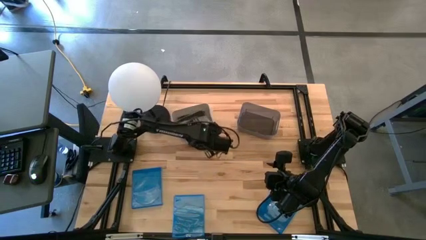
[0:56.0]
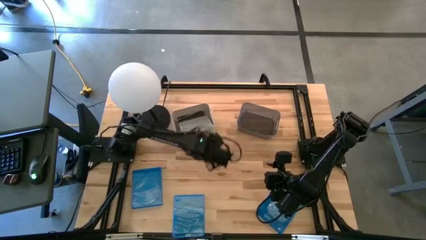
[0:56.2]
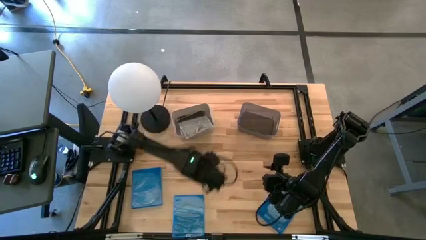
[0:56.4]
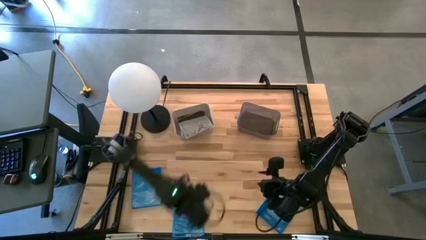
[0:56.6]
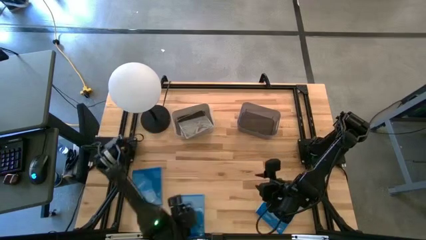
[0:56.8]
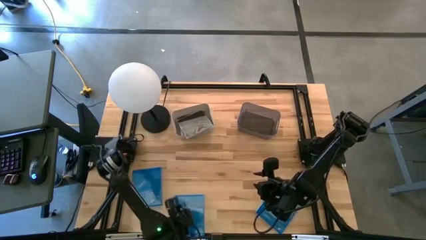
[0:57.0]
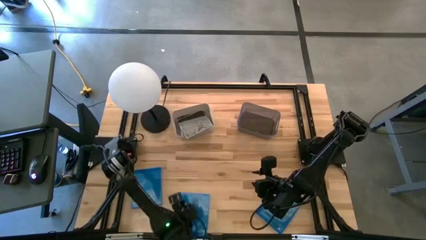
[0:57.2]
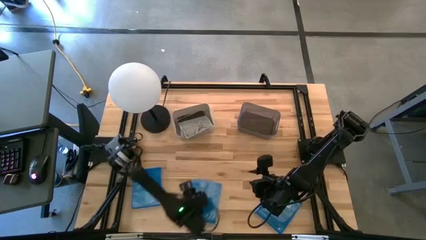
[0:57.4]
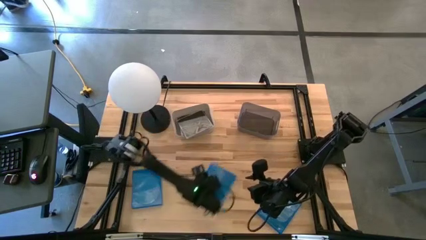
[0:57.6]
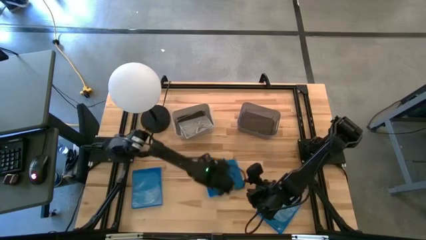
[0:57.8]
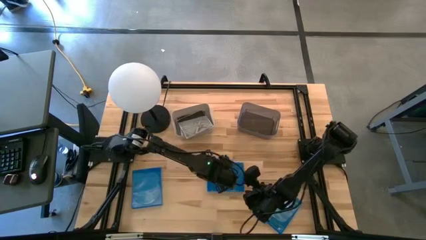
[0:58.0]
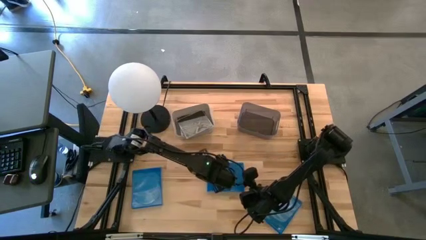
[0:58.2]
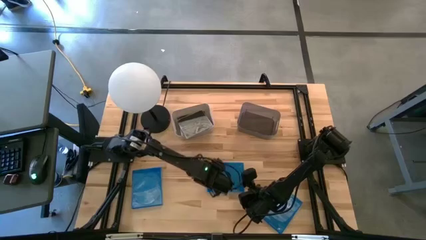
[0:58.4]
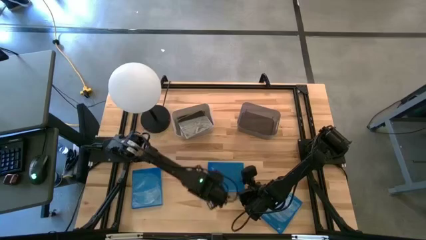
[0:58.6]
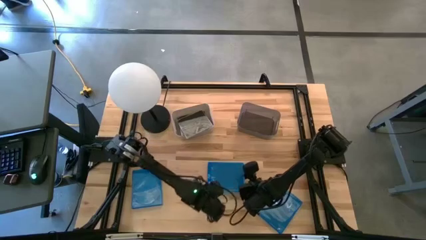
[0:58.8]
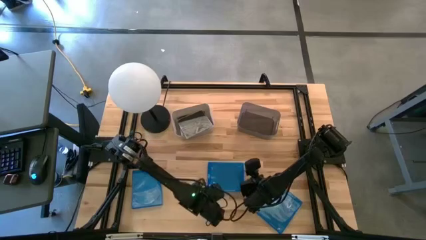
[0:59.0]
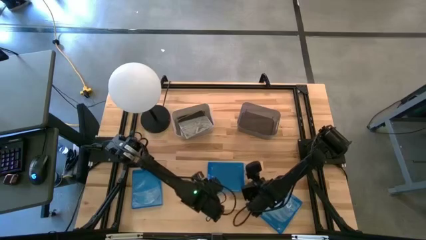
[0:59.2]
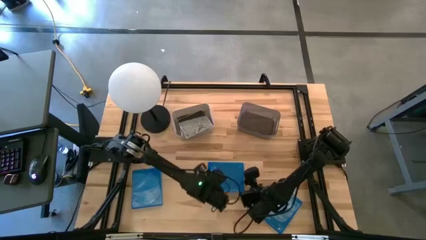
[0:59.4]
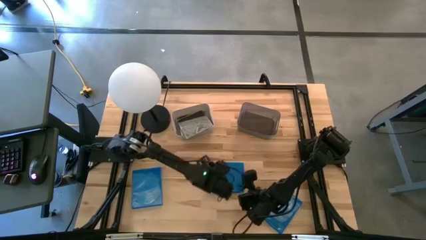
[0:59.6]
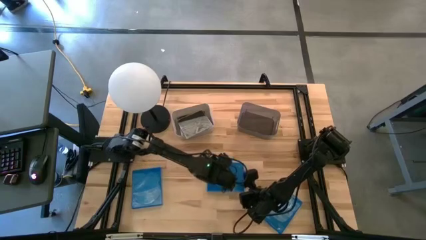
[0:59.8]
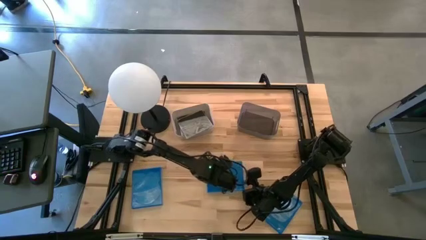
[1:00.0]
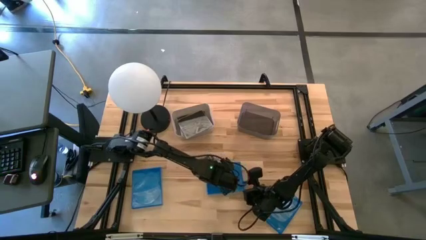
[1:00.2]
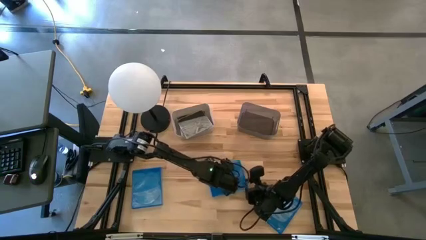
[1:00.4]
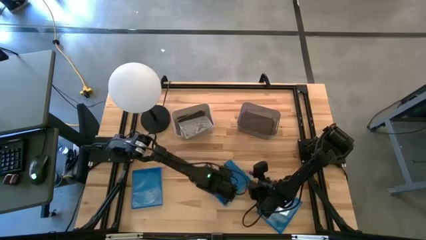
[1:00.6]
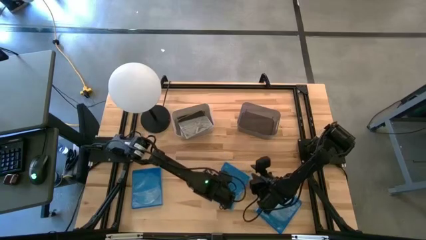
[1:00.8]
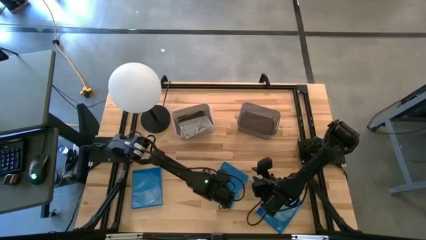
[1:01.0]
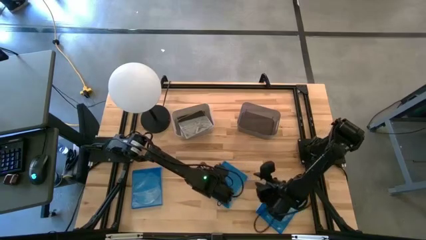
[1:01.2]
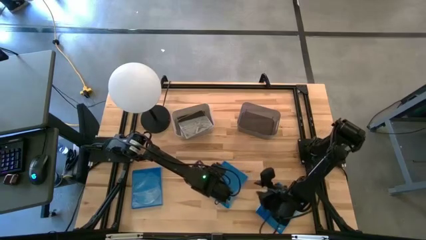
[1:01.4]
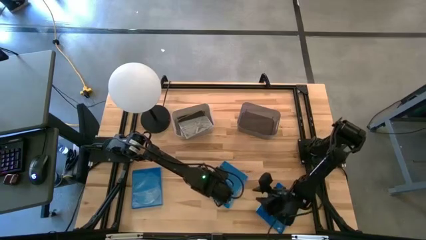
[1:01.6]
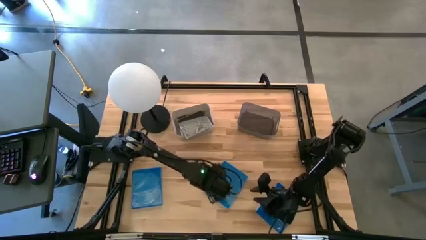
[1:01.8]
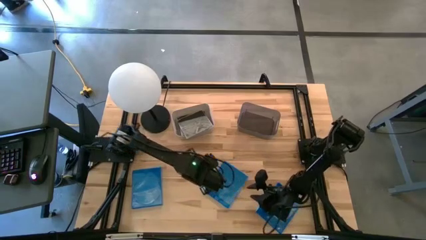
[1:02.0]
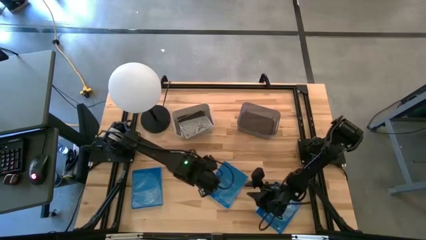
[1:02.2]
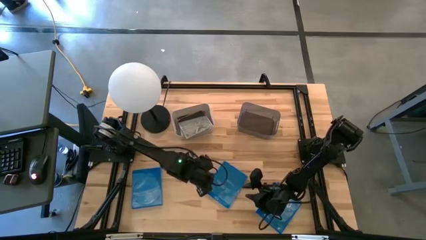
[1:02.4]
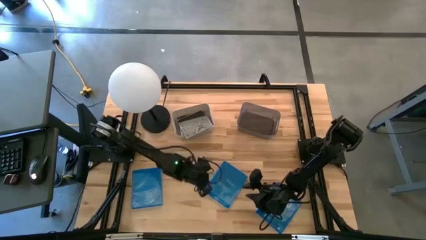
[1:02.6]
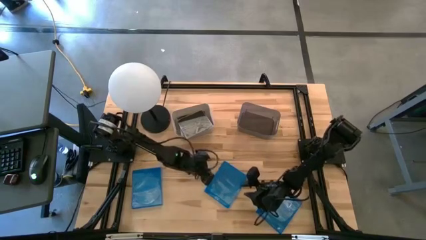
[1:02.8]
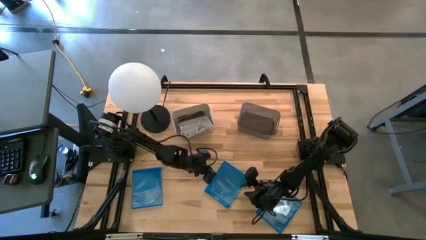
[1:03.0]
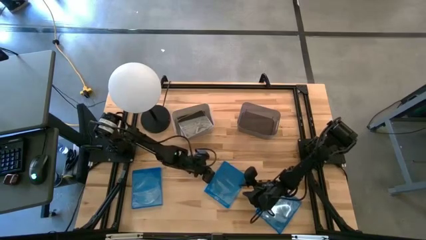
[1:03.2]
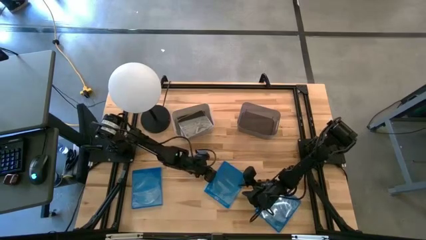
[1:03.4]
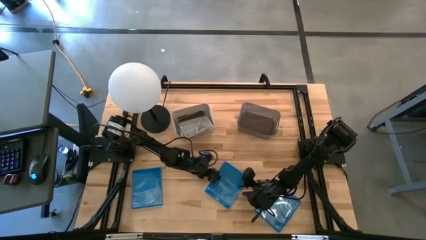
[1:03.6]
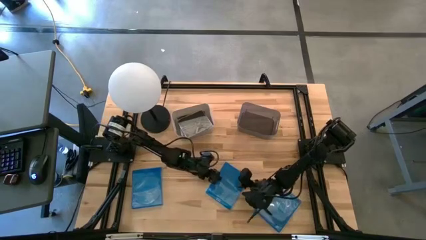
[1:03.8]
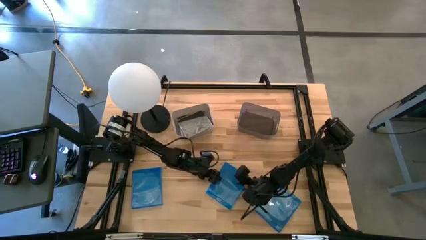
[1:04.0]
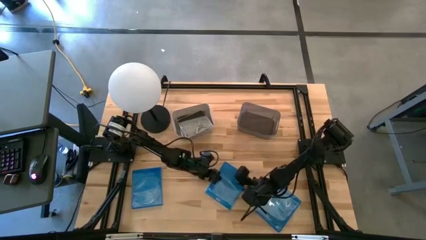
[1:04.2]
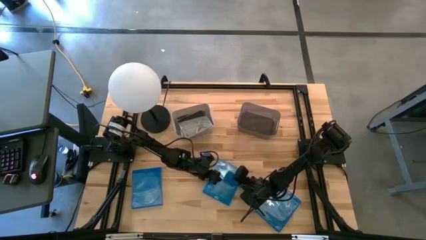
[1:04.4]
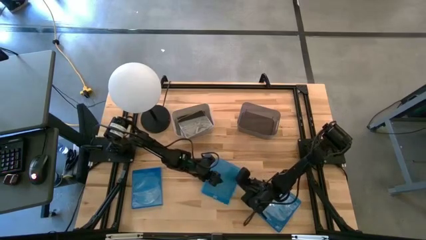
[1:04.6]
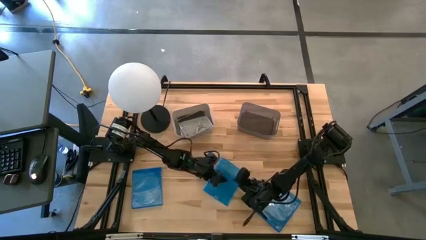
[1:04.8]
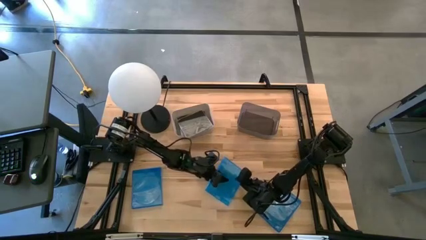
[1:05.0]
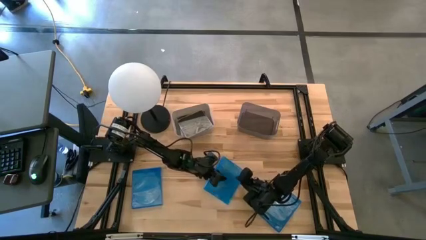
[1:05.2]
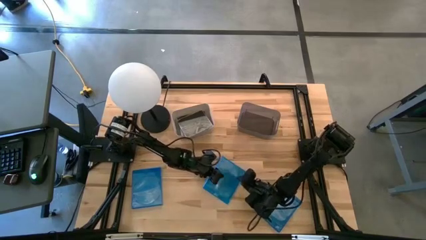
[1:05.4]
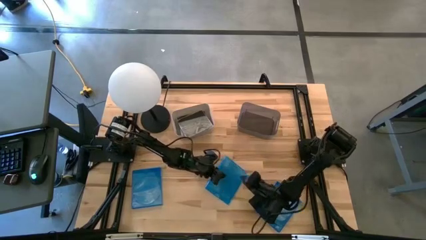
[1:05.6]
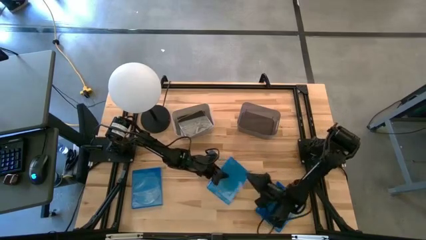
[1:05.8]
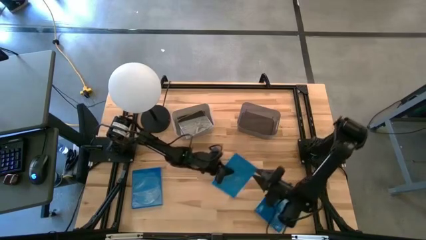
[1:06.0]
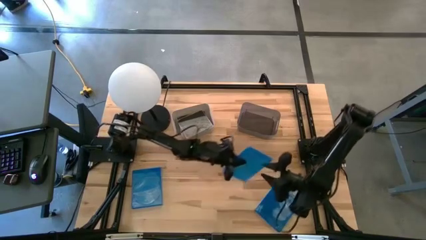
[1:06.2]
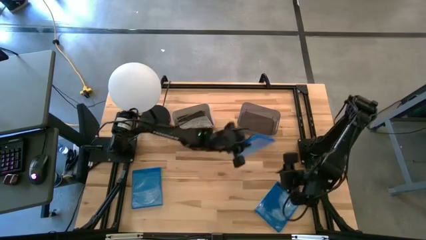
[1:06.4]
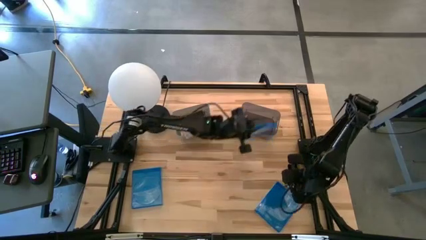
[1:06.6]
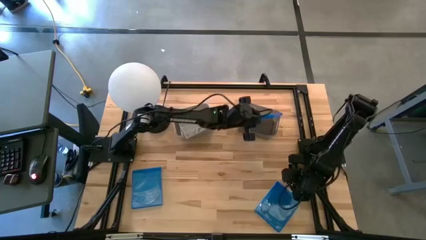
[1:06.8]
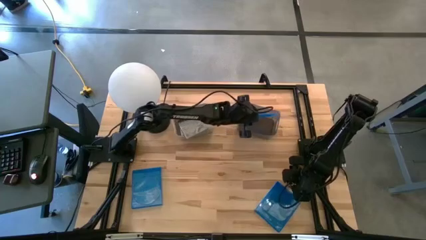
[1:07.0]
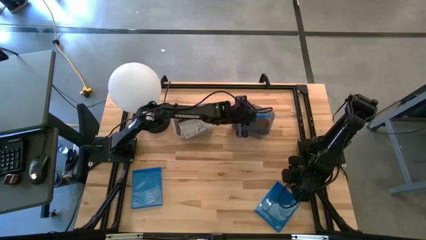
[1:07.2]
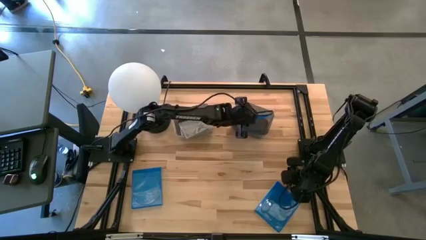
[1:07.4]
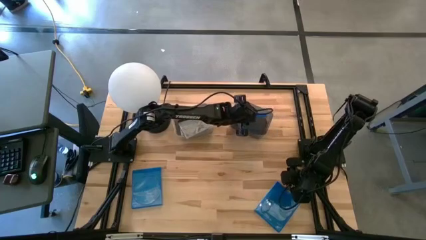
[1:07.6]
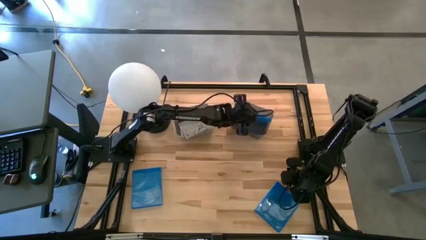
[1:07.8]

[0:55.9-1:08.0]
Task: Pick & place jewel cases by type
Put the middle left blue CD case into the black bin

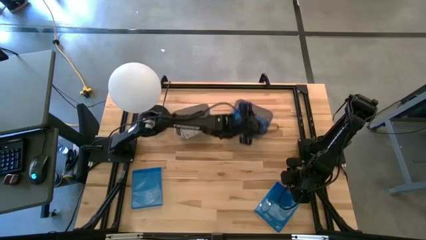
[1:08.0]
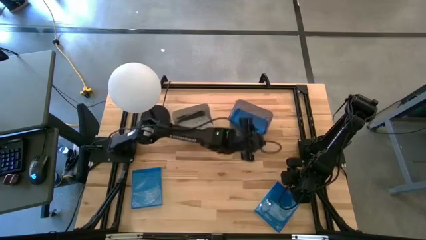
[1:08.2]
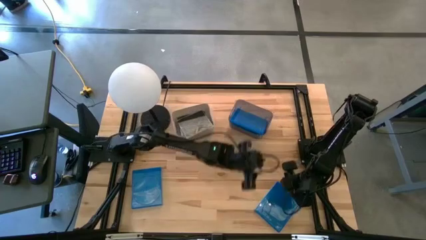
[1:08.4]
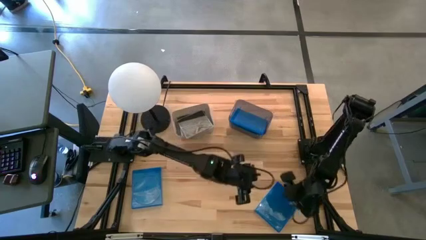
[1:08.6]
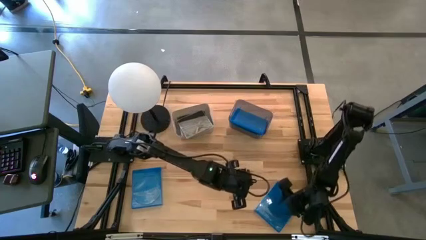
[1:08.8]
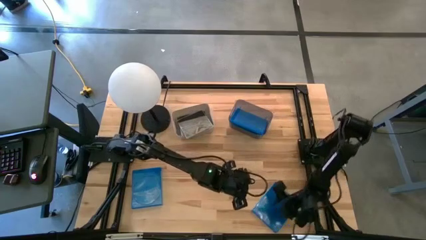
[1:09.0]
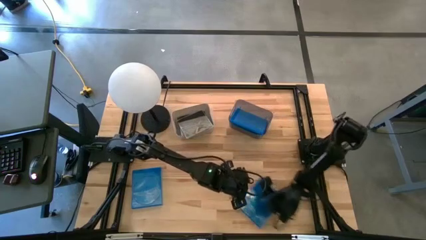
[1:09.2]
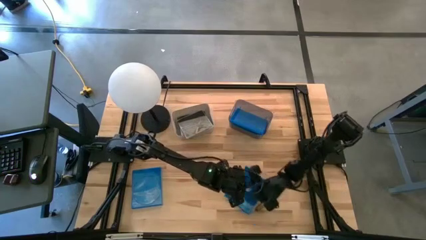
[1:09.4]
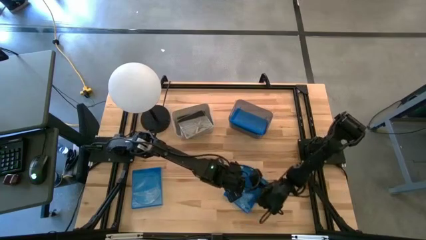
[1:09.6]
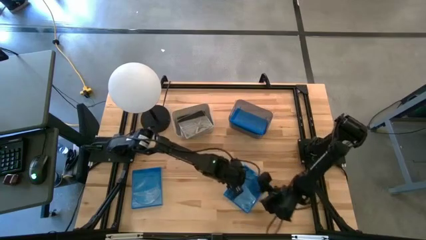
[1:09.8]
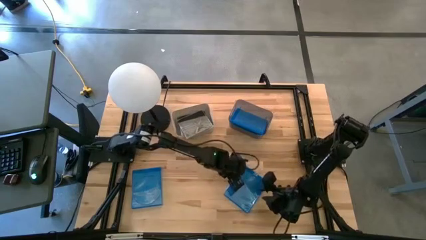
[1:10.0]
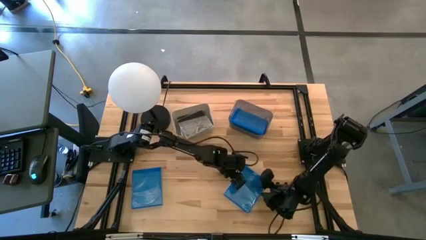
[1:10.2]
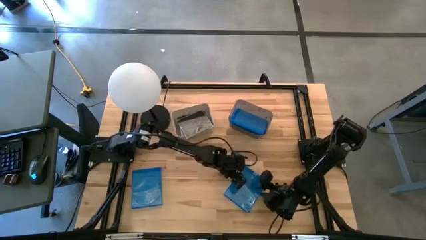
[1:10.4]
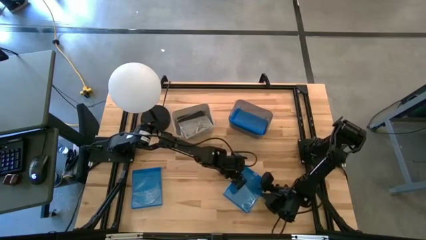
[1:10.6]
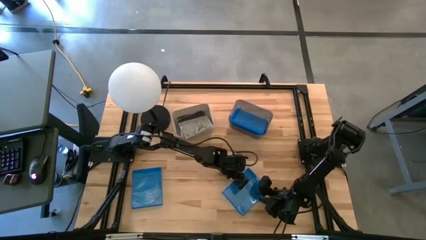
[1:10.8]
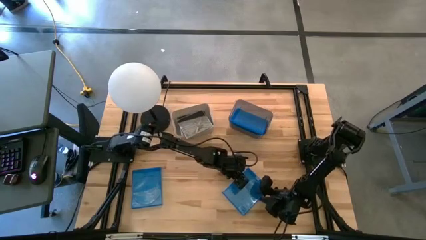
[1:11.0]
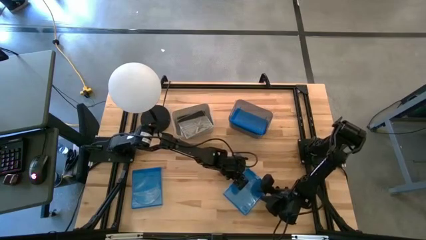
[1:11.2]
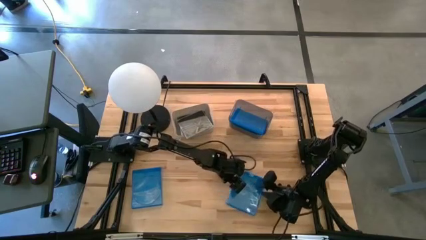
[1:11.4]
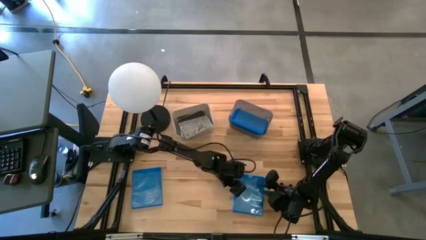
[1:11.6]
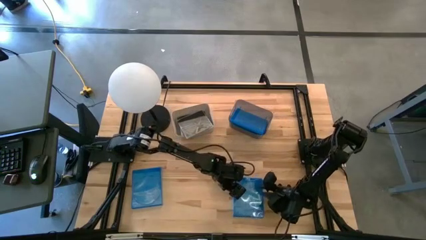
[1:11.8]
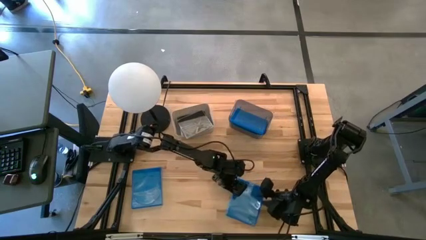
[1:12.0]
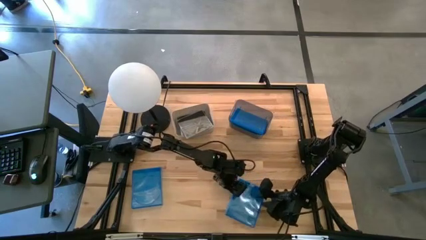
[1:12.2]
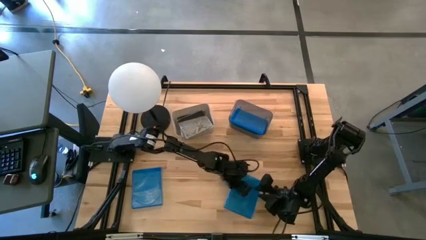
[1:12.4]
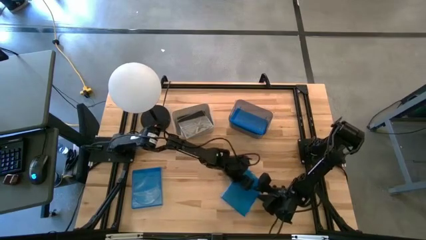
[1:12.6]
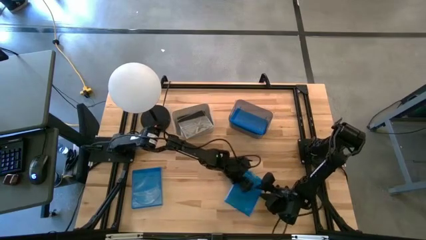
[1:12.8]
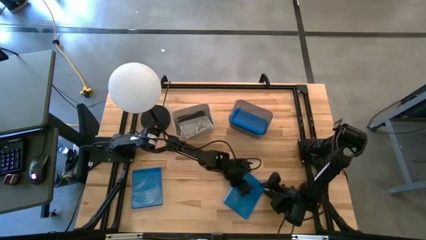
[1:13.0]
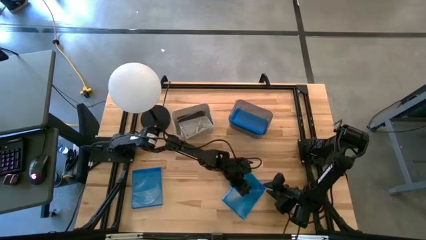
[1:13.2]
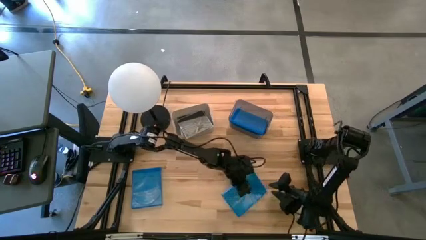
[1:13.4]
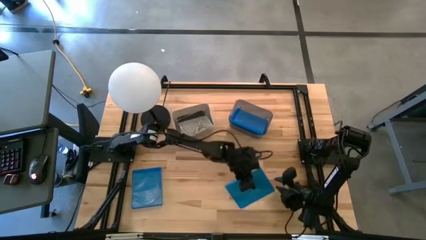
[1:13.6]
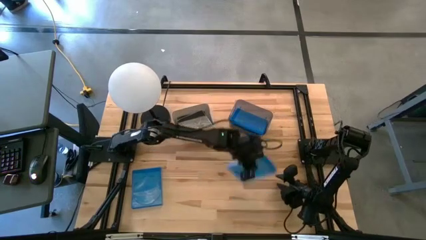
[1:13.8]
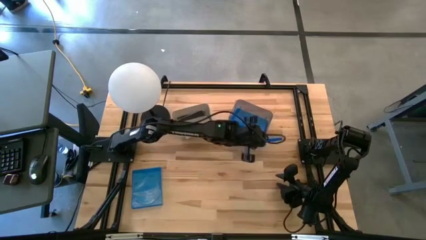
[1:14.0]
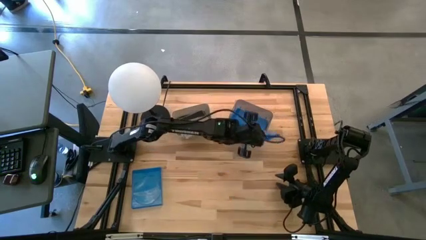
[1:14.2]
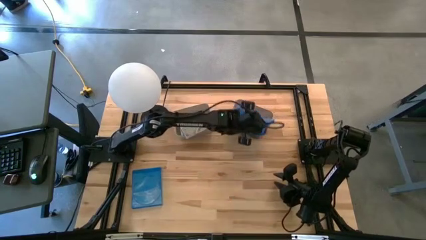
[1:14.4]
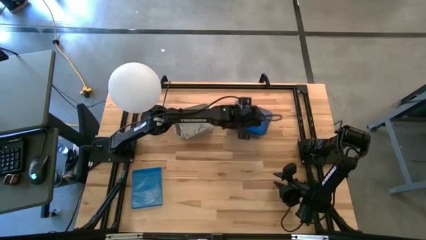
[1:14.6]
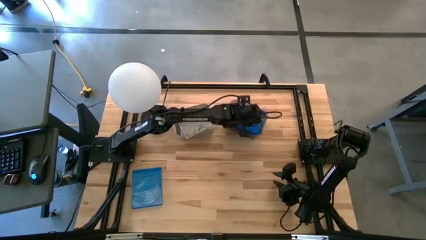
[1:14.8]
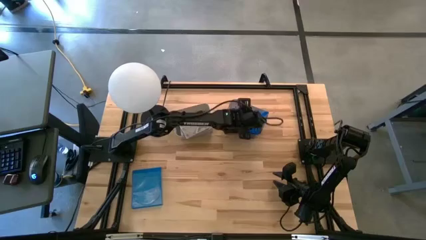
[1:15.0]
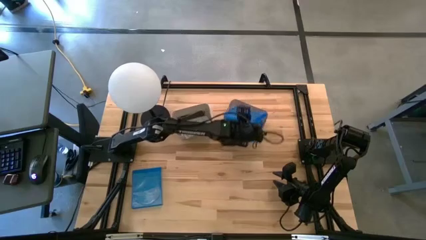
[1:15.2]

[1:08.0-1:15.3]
Put the right blue CD case into the black bin
